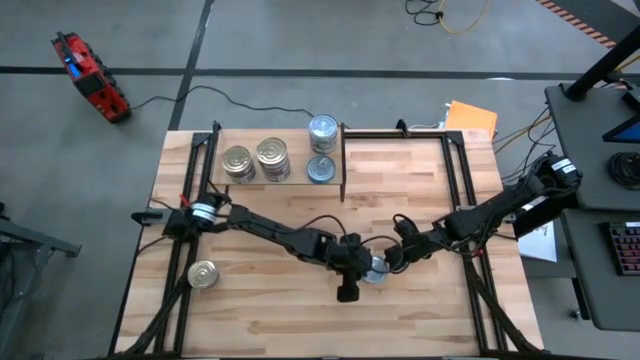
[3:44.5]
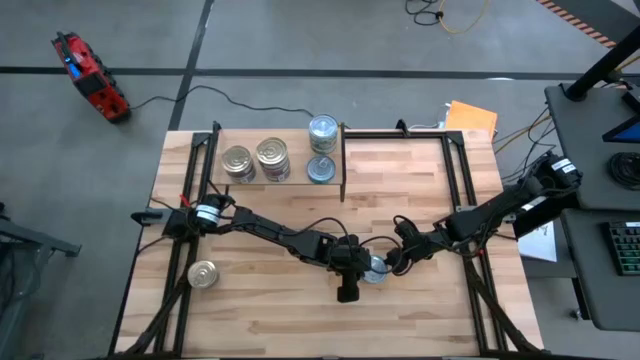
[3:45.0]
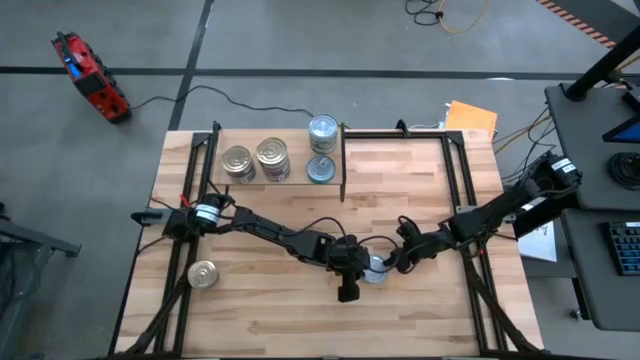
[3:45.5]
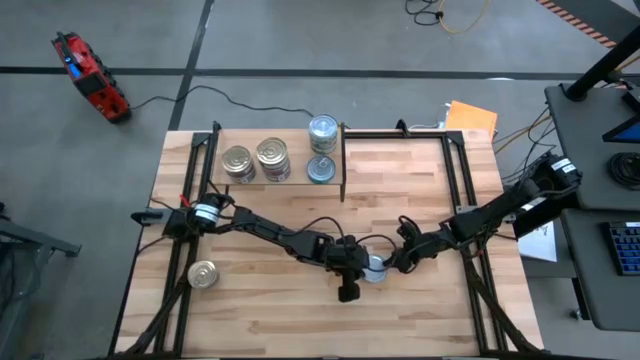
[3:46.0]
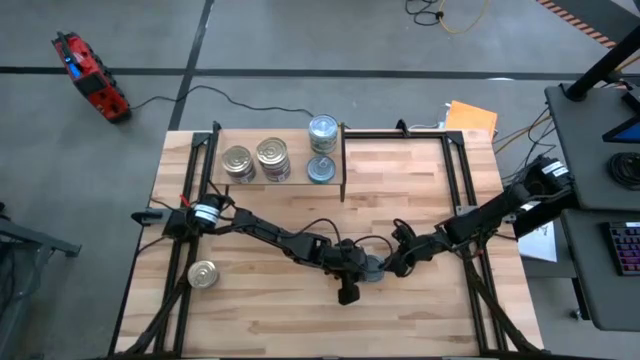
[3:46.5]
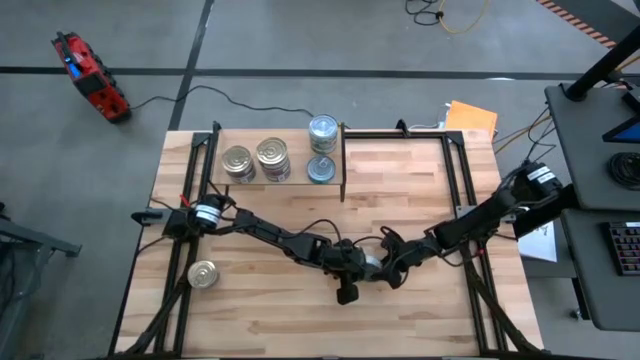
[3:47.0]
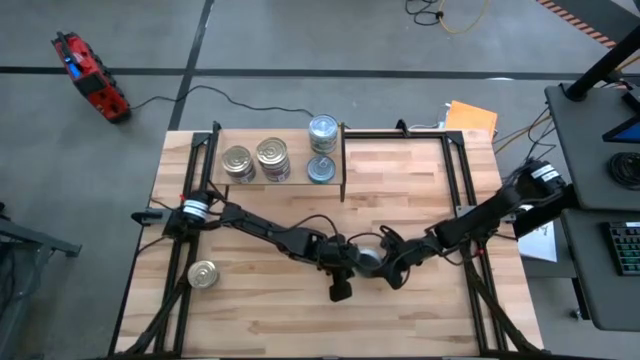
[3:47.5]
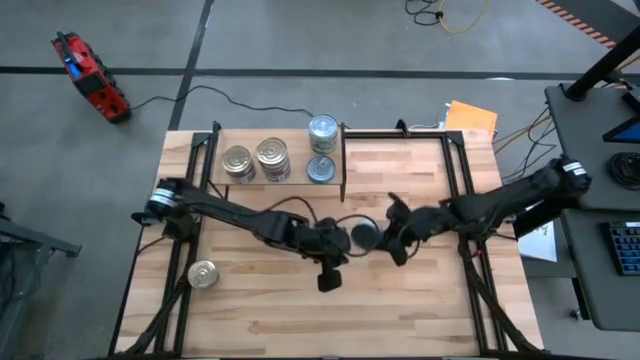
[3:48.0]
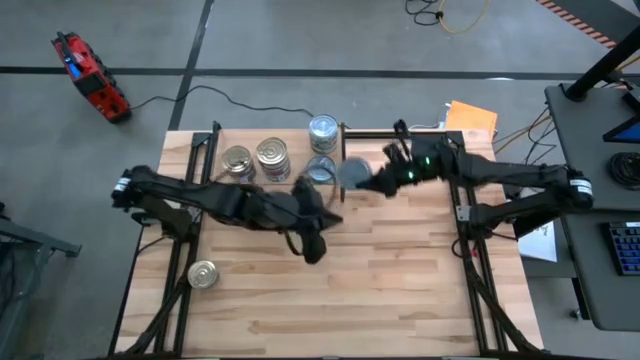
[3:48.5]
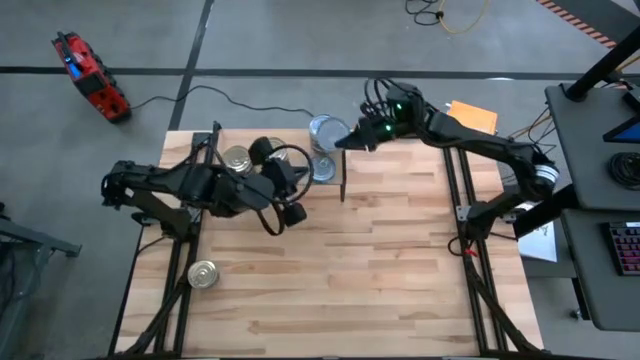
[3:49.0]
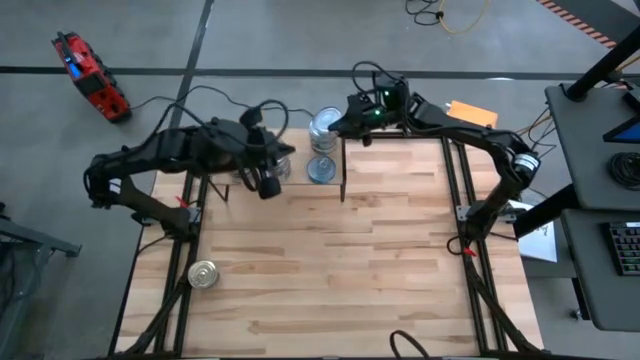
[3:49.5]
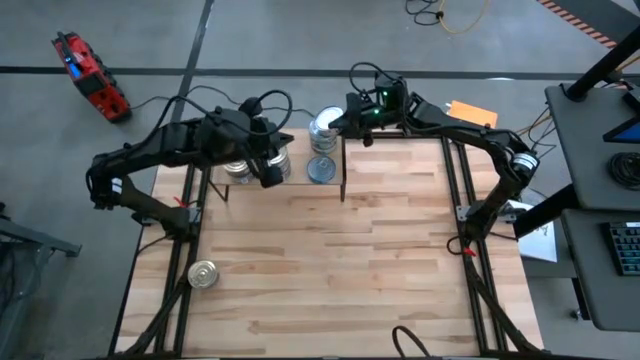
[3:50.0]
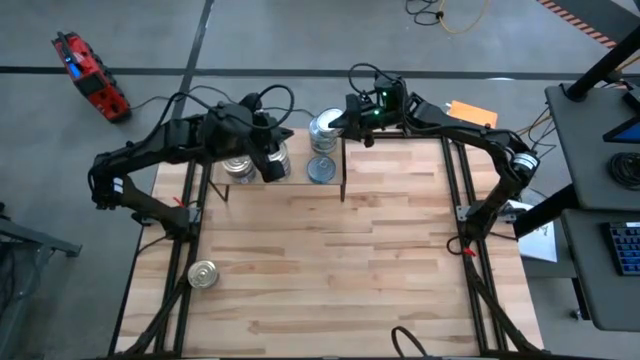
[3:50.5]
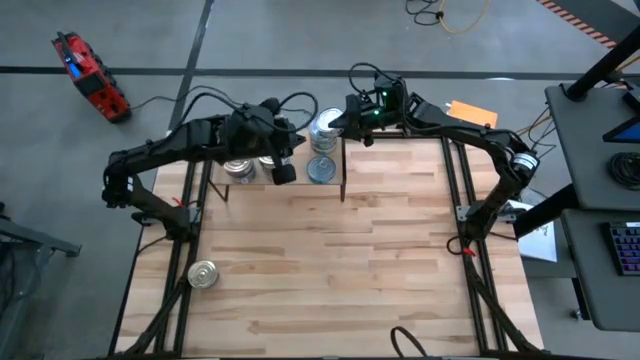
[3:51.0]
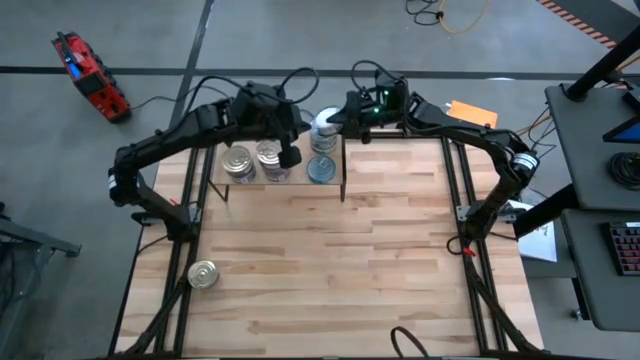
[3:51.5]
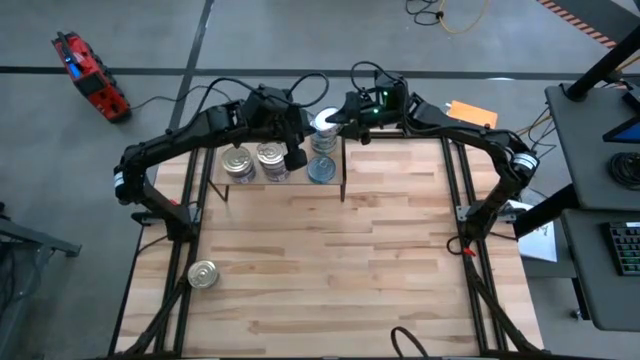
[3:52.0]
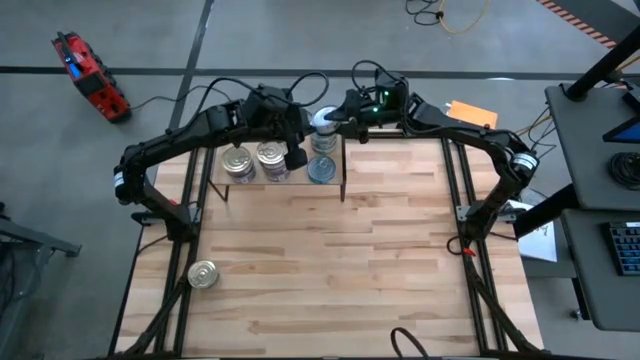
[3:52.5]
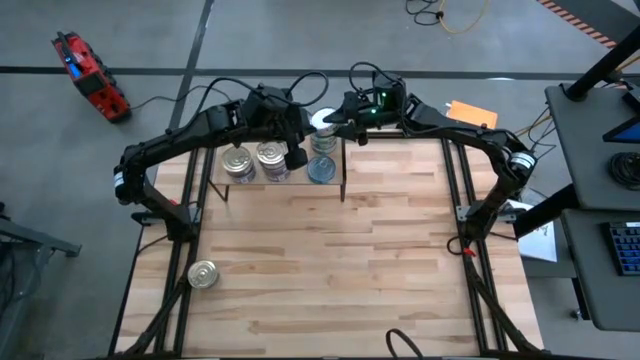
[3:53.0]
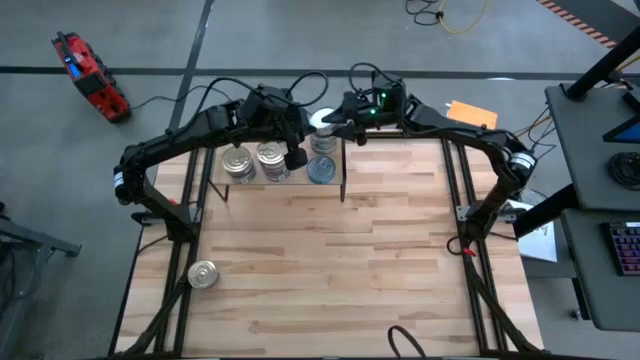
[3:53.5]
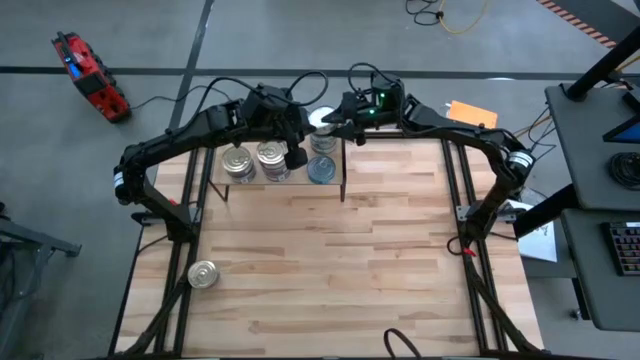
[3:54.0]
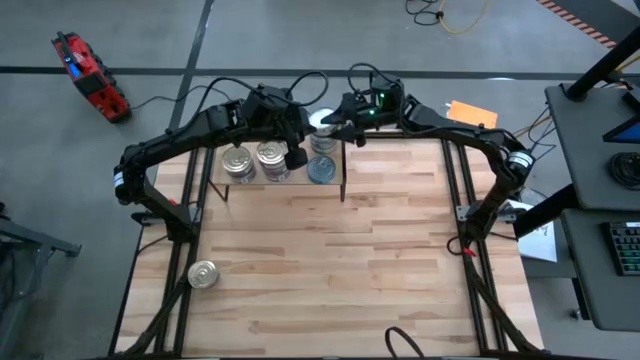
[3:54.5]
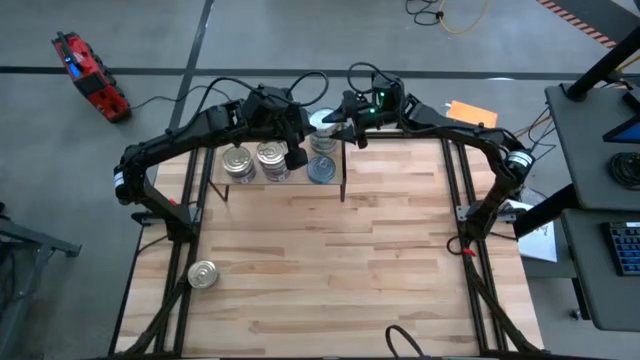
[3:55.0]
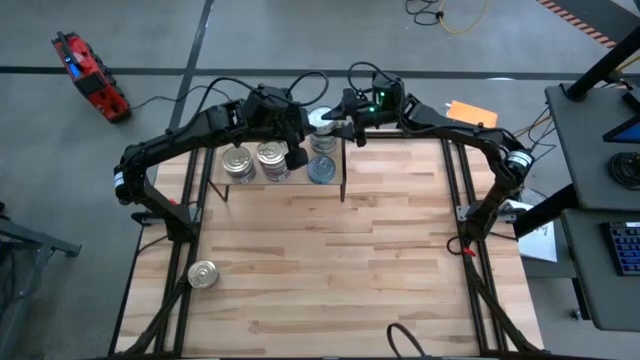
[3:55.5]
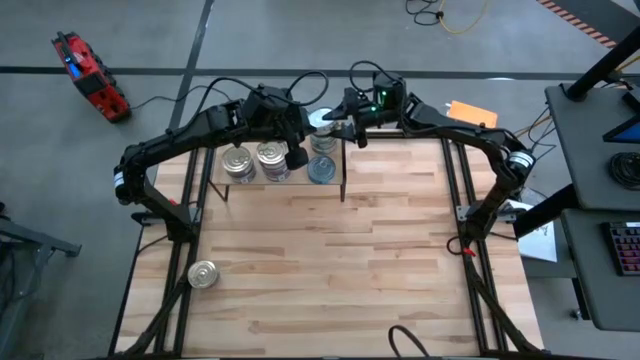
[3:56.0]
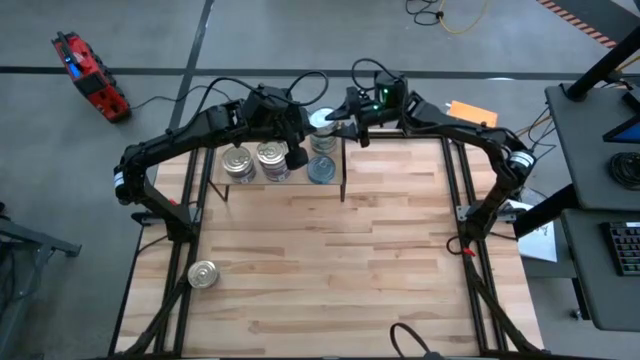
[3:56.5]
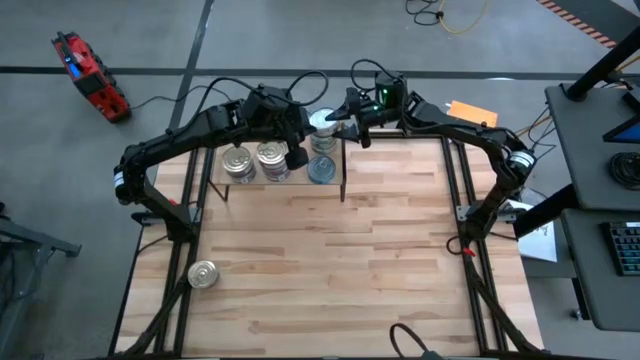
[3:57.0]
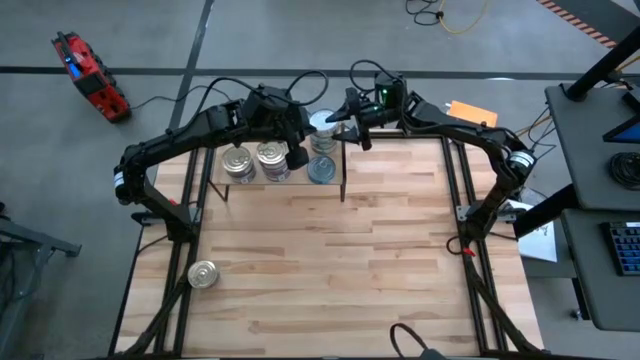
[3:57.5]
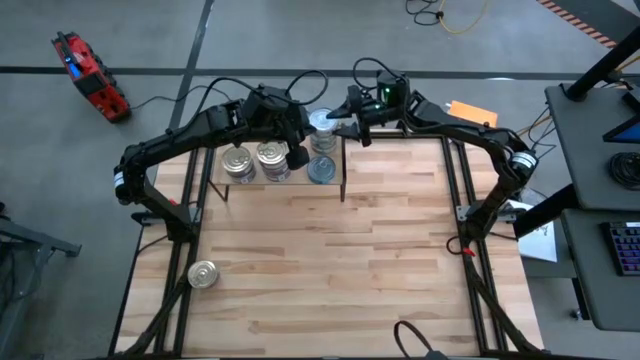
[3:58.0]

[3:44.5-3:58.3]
Task: Stack canned seafood by type on shelf
Stack the green tuna can on top of the green tuna can on the shelf

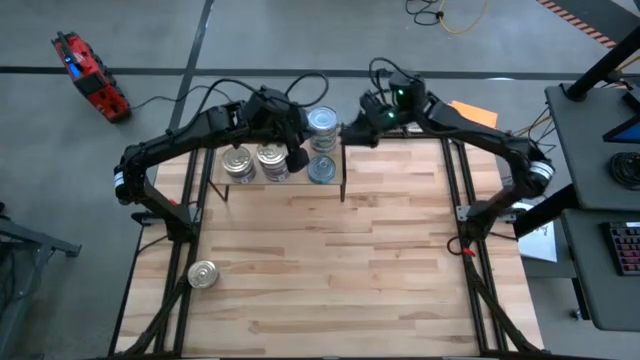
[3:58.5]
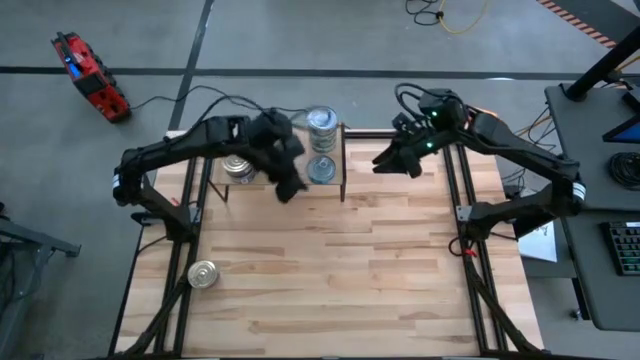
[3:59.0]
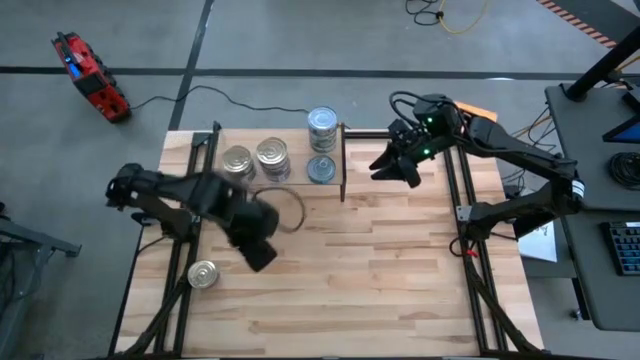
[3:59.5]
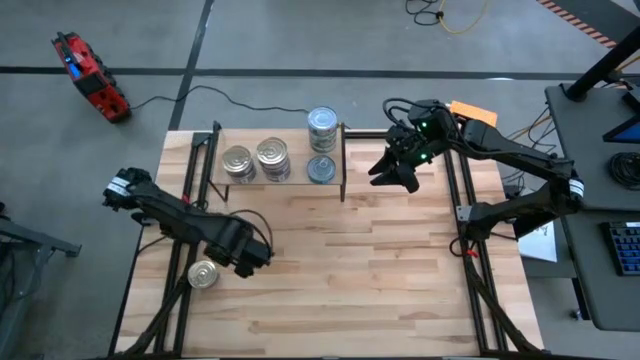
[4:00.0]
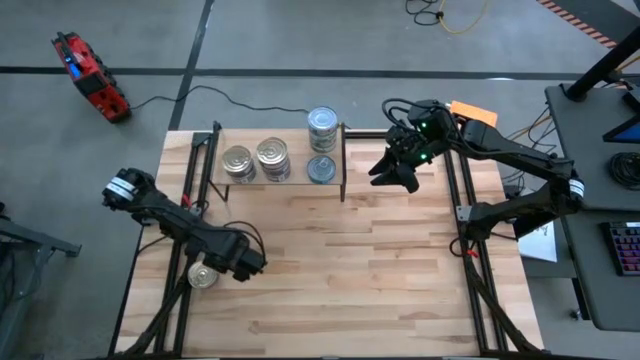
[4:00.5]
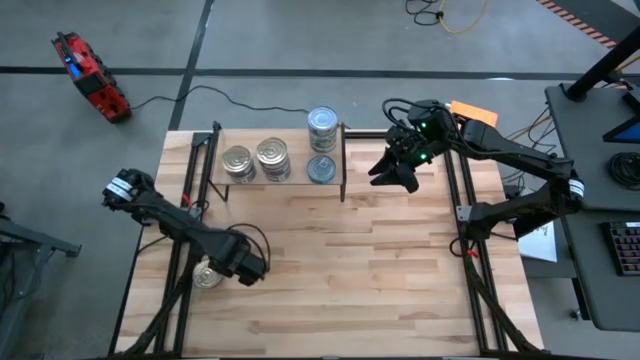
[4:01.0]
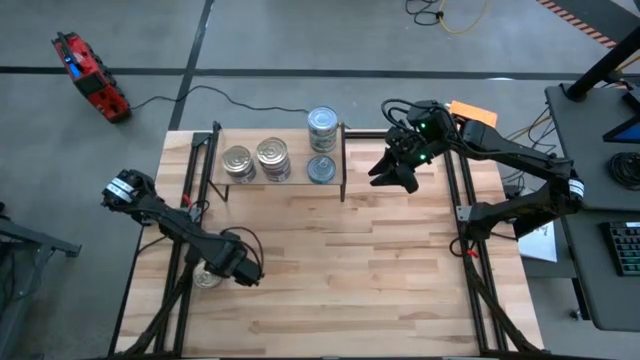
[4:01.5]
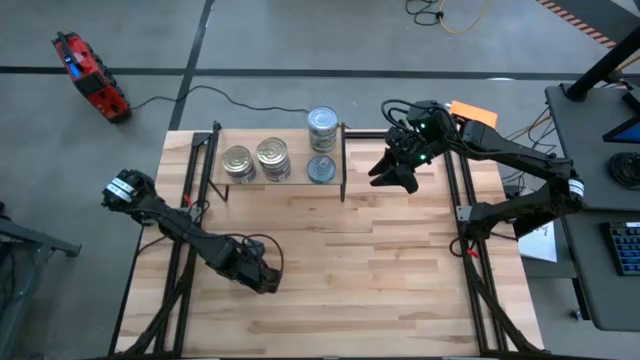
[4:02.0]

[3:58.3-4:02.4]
Stack the blue and pink tuna can on top of the blue and pink tuna can on the shelf

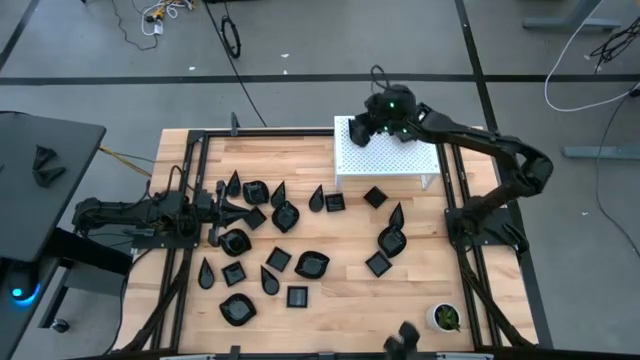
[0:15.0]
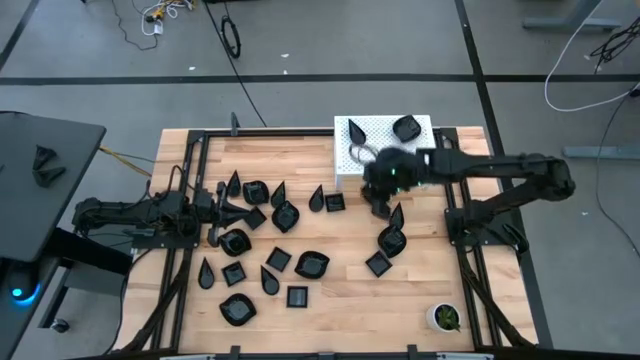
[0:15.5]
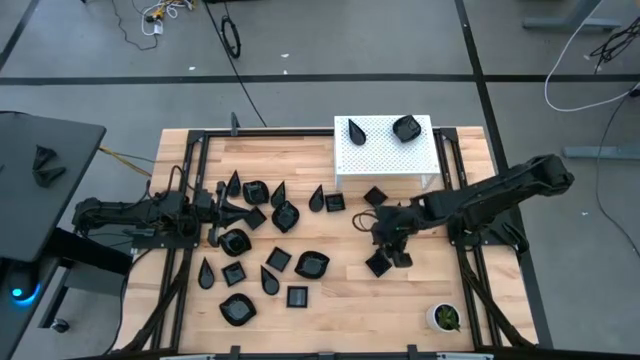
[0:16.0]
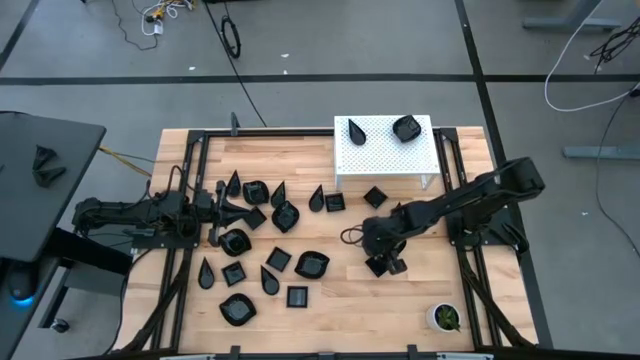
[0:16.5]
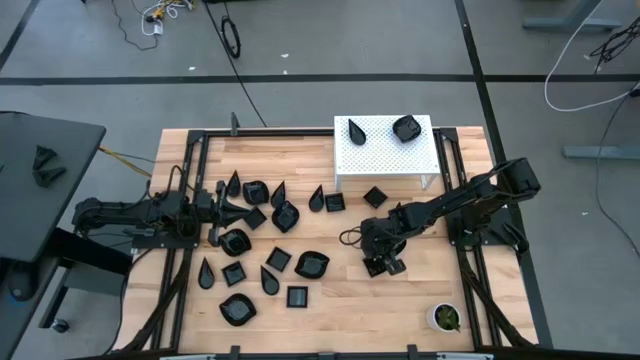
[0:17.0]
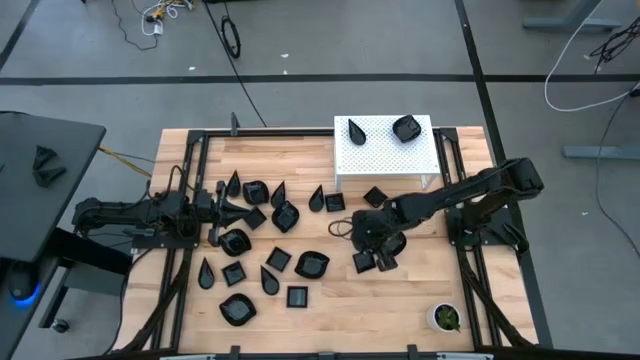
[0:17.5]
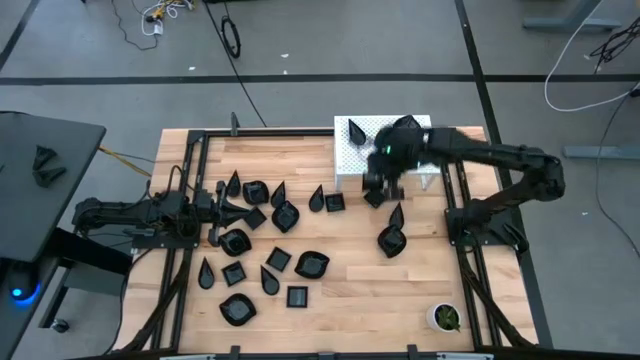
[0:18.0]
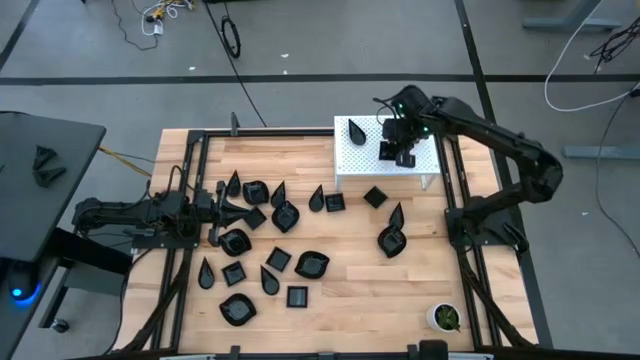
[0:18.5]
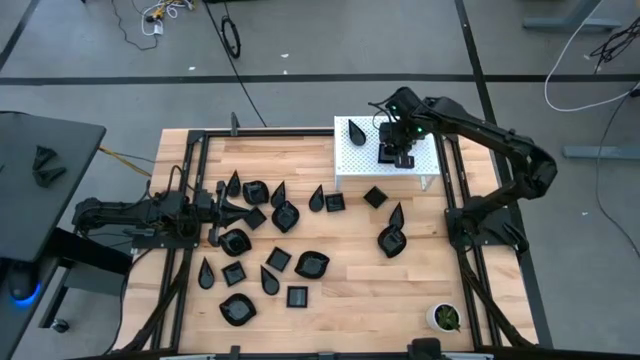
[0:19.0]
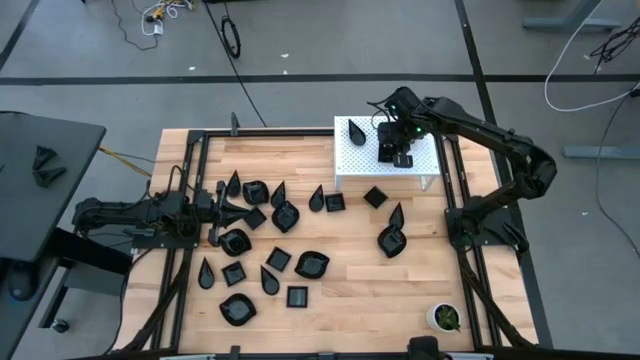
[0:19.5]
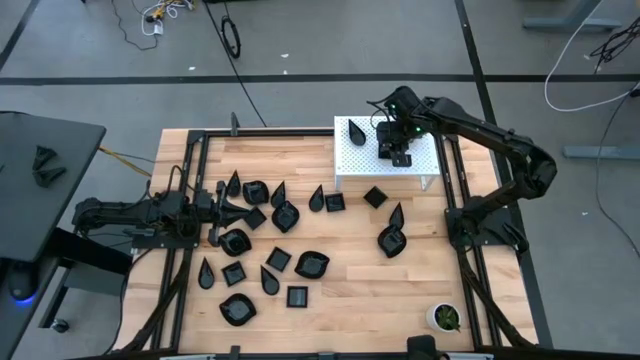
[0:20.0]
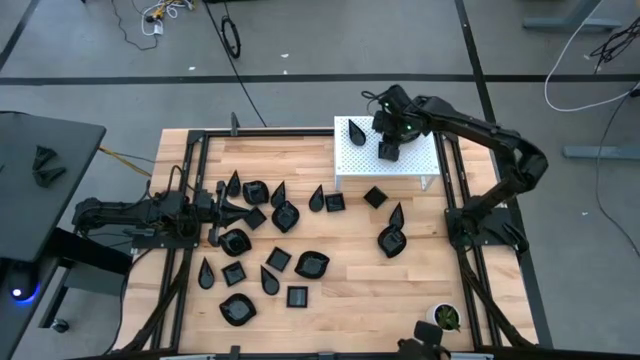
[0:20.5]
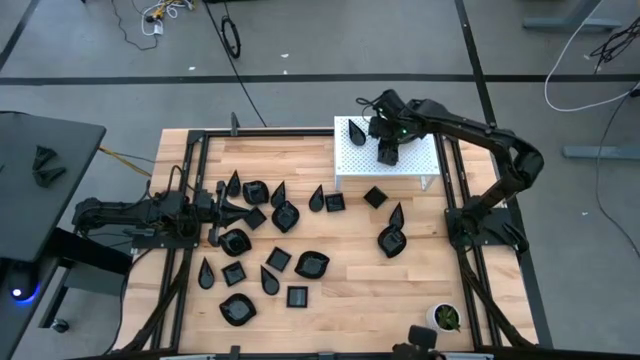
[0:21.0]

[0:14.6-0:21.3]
Task: Pick & Place Mini shaped plates
Put the black square plate on the shelf
